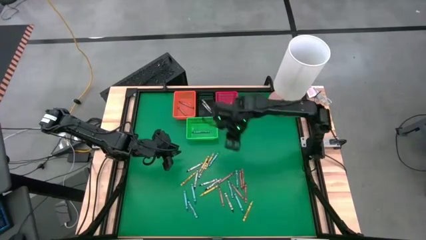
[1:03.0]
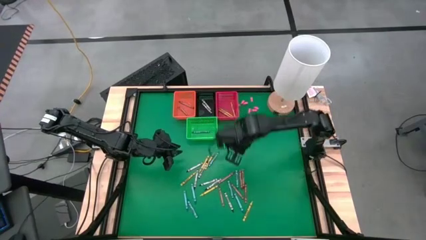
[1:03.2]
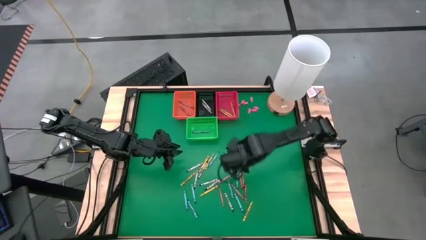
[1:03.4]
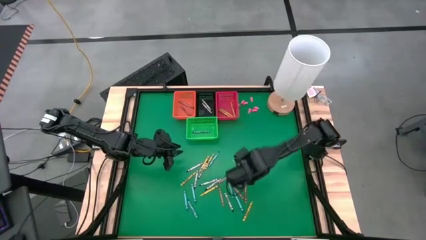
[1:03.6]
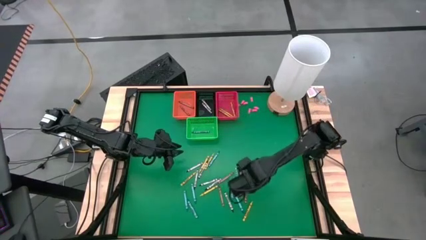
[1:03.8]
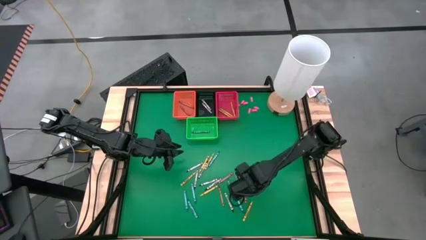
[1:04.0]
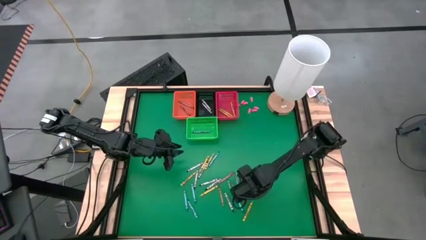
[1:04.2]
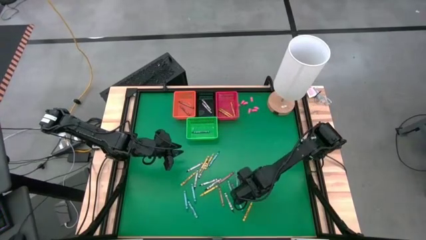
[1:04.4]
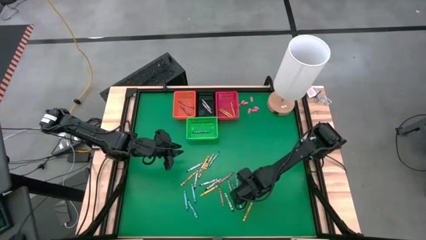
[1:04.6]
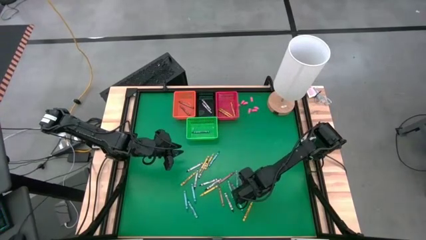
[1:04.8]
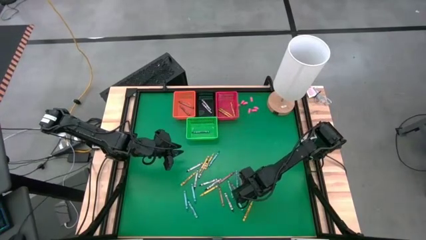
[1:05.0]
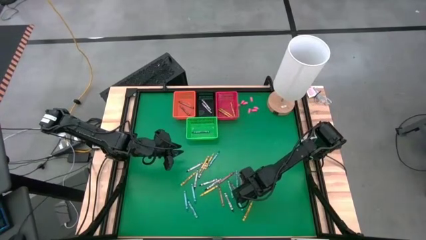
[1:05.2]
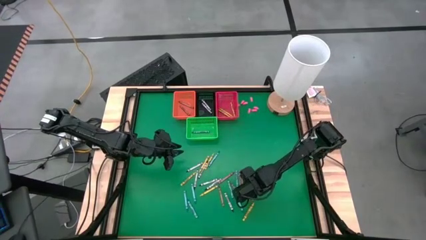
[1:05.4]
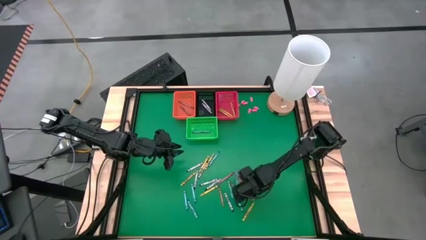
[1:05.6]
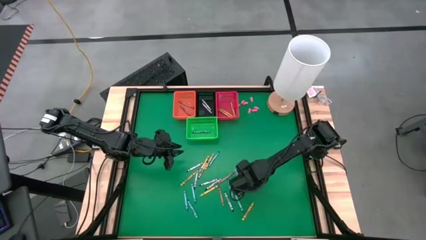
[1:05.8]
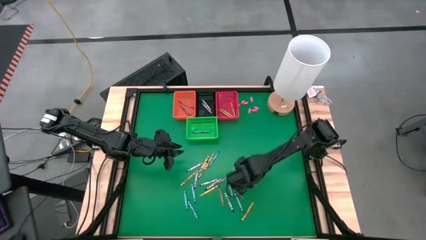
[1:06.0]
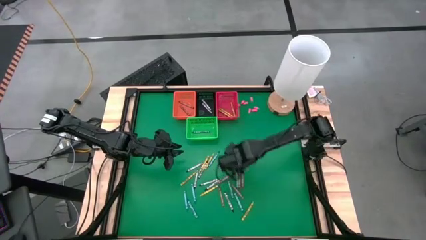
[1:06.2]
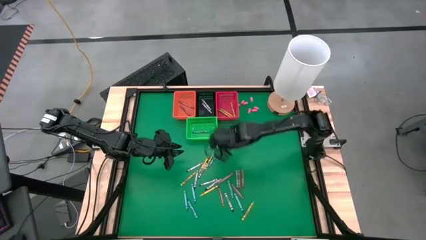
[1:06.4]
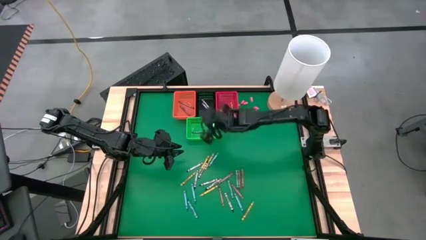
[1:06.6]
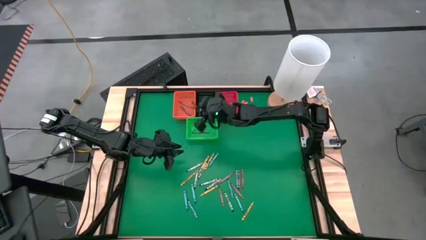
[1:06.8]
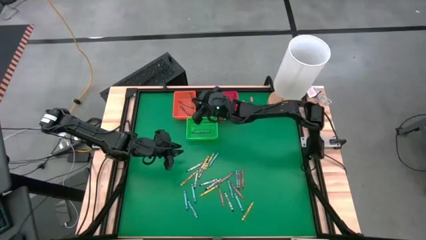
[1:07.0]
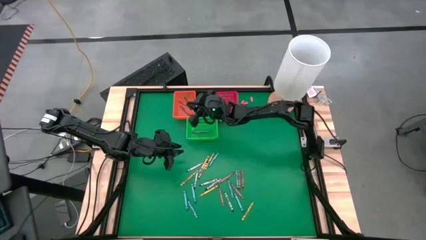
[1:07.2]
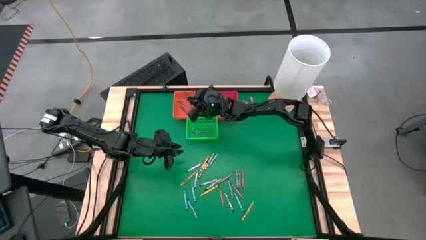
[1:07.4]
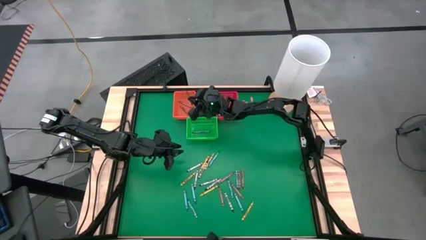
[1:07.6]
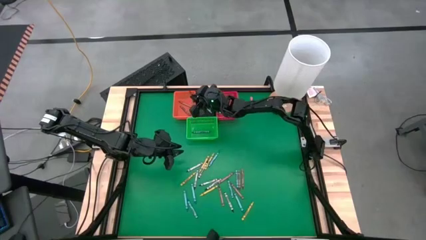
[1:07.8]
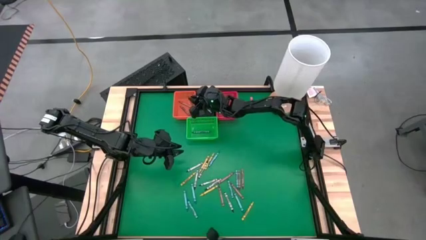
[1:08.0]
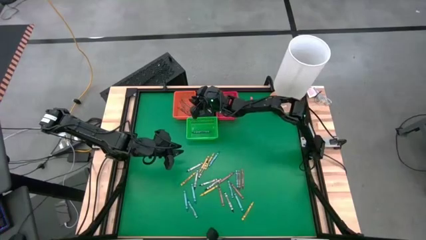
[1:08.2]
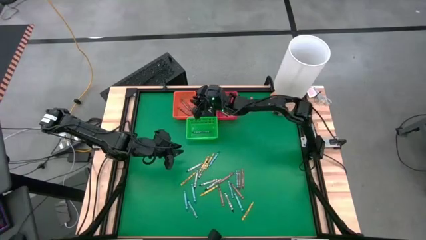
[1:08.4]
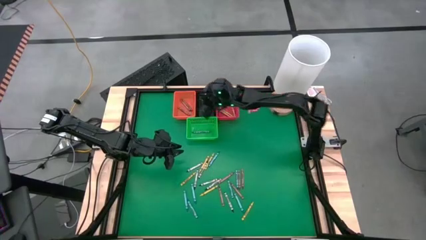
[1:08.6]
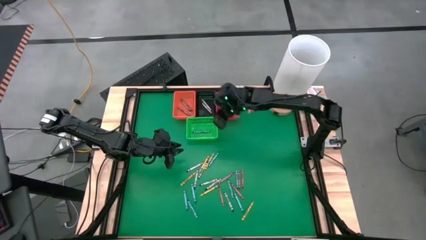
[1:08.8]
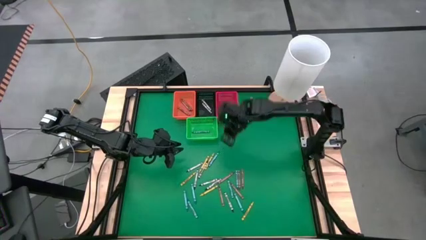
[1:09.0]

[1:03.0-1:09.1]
Task: Sort crayons
Put a red crayon in the orange basket

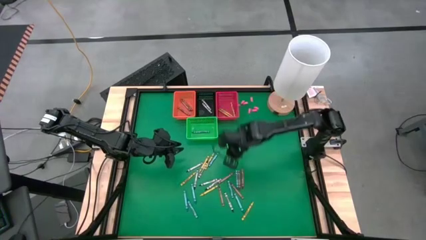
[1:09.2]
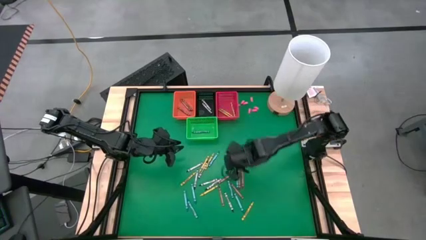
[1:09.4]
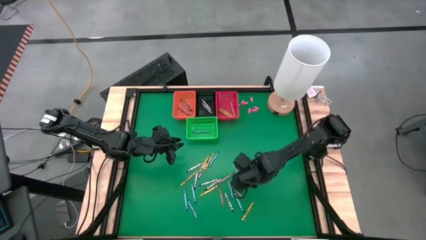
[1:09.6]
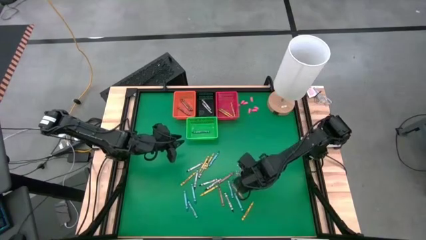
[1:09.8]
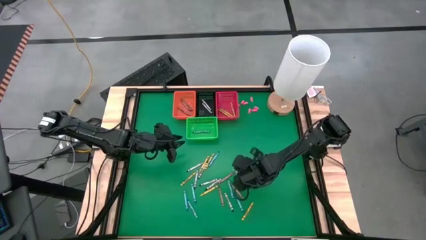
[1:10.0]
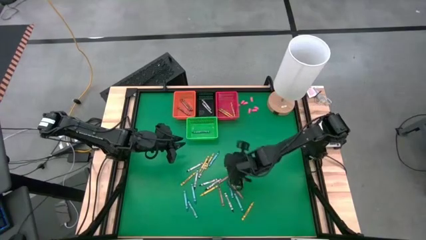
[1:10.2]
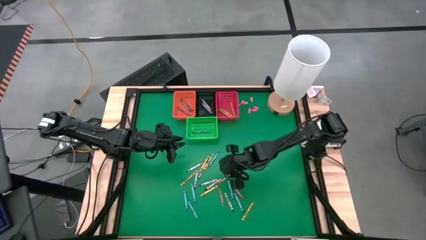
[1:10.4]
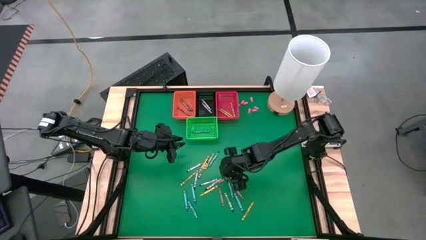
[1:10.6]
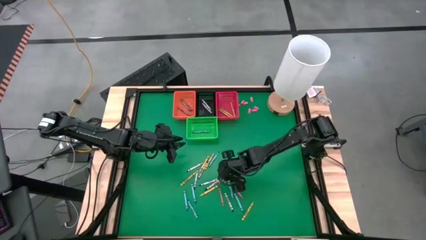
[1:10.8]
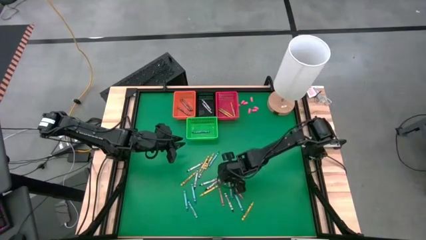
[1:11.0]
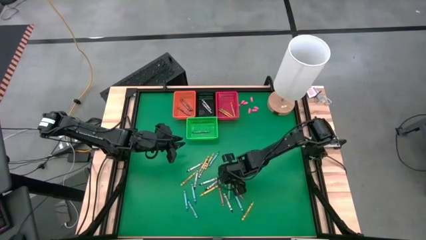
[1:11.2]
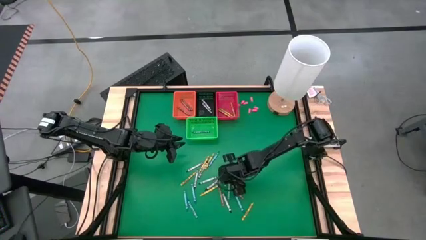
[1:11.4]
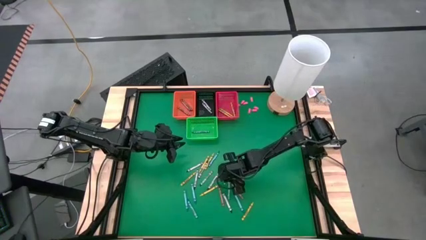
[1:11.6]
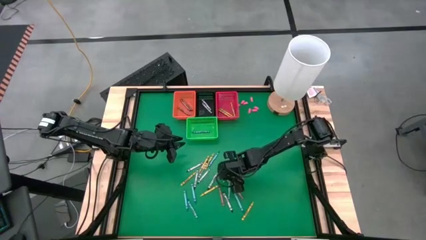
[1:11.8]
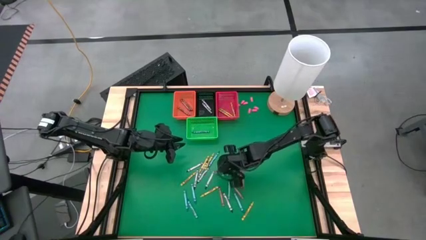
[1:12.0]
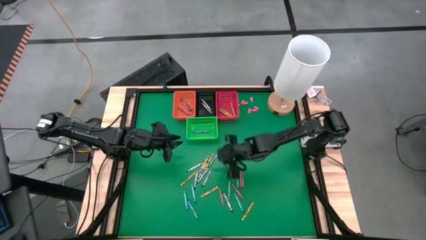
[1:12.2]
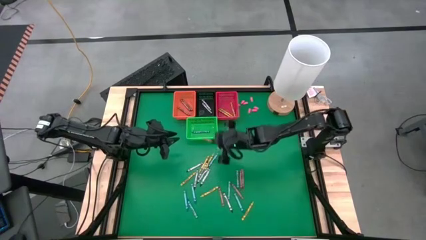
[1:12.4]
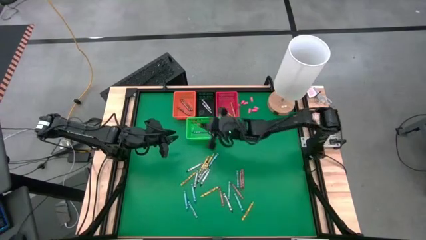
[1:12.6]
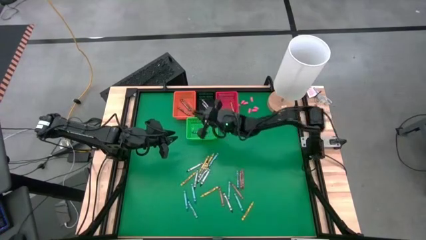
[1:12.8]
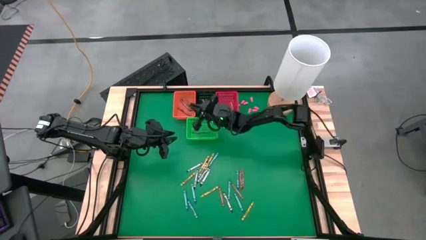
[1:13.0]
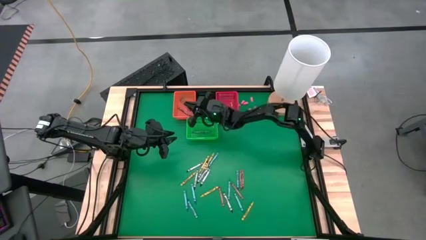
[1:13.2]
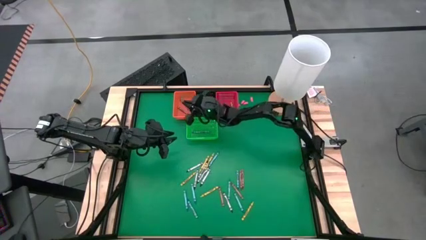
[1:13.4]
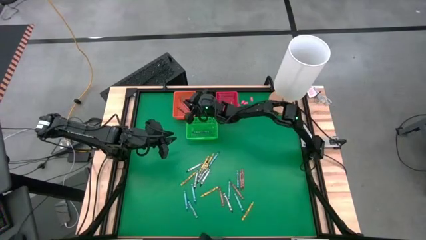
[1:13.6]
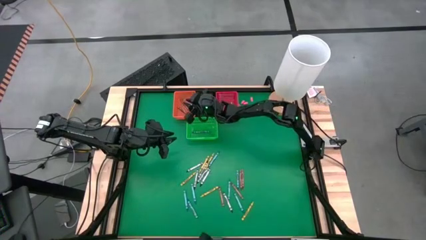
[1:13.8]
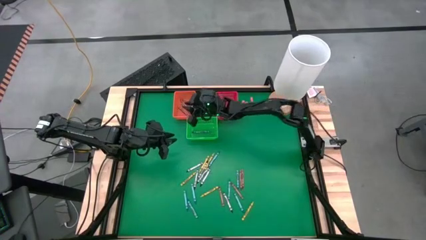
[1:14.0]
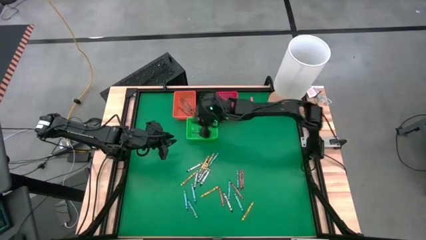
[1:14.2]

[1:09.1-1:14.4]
Put a red crayon in the orange basket

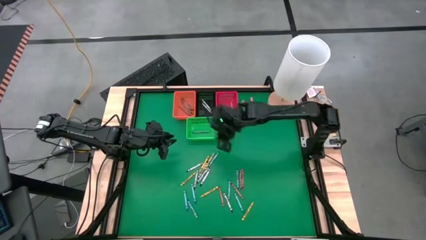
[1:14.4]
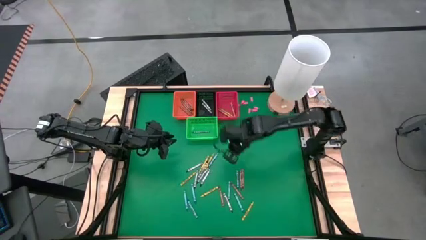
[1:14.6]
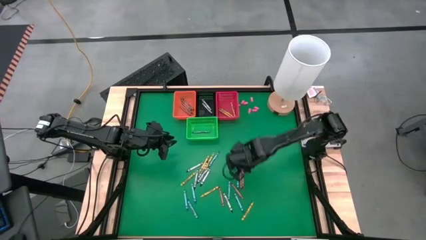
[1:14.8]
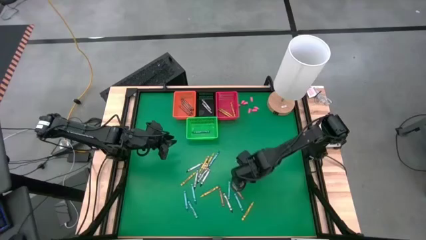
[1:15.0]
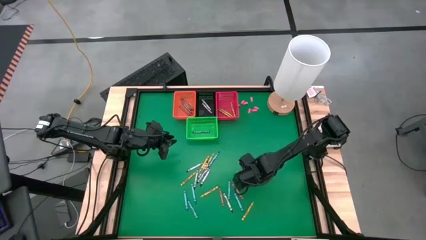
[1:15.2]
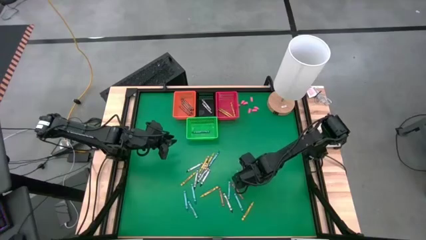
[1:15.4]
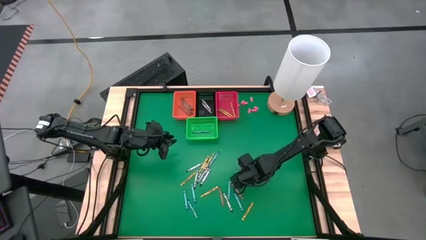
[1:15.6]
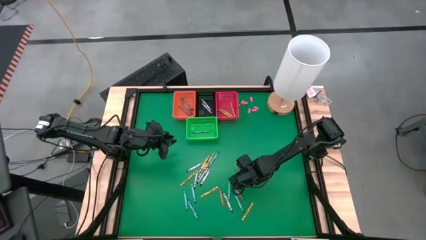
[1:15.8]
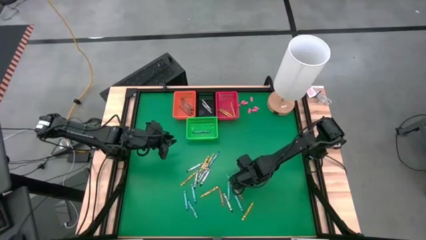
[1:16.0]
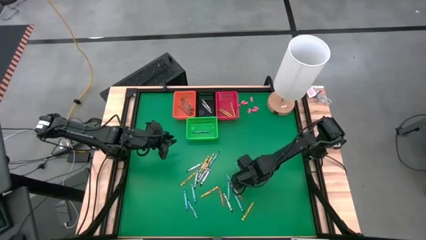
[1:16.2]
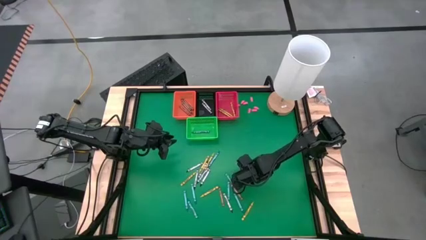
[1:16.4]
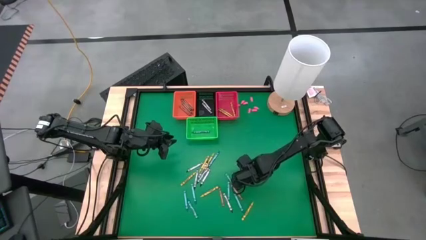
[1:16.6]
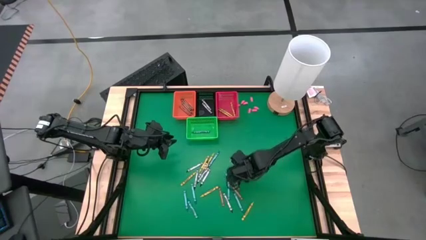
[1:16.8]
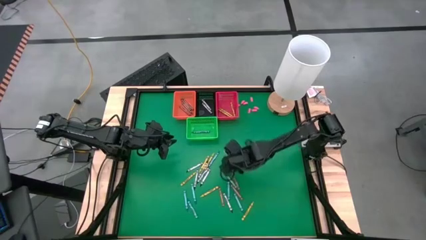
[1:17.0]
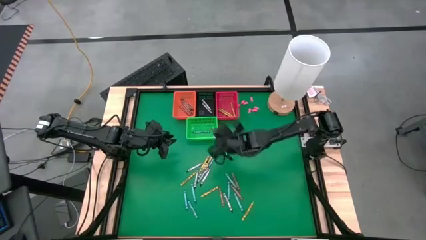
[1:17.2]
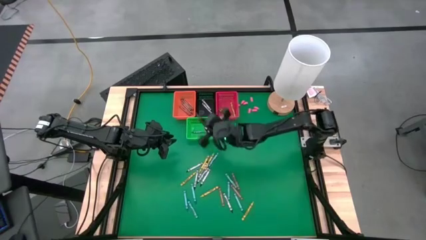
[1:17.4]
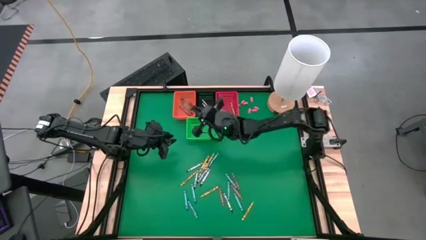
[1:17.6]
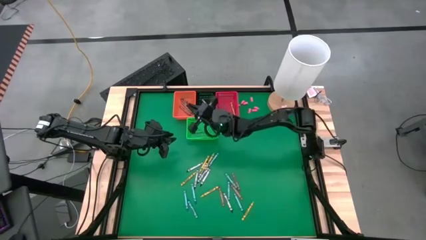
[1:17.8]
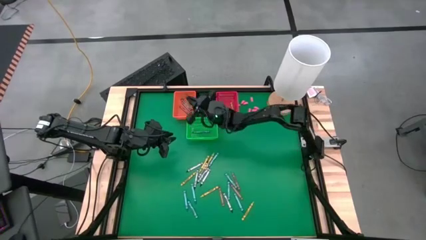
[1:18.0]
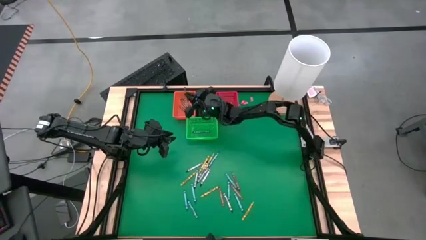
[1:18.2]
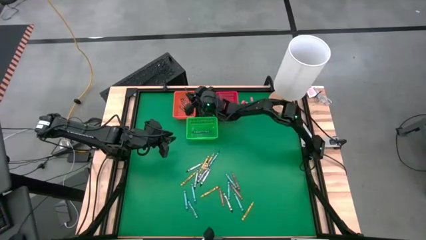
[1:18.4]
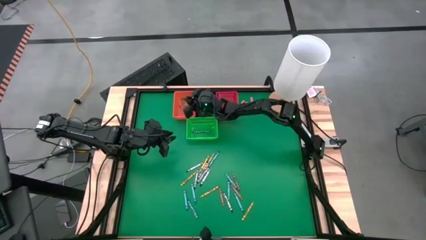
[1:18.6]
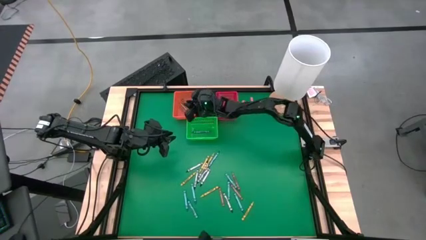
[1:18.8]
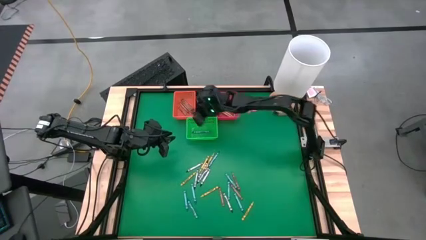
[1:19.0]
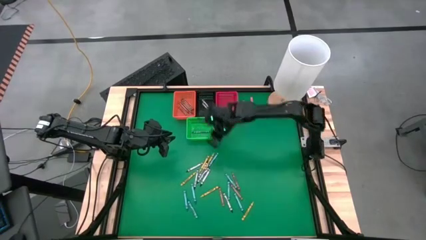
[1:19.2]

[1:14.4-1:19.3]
Put a red crayon in the orange basket
